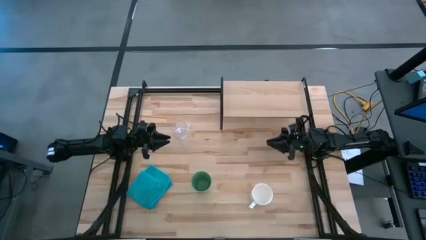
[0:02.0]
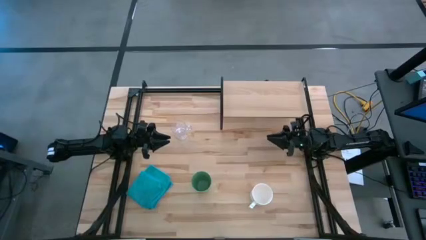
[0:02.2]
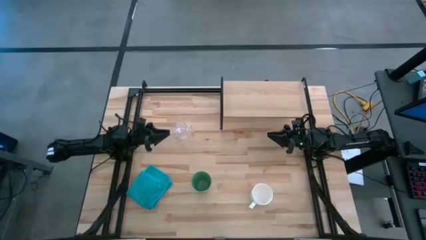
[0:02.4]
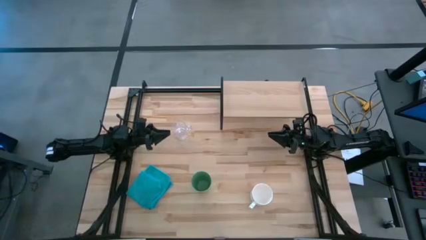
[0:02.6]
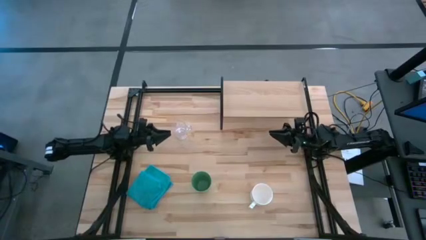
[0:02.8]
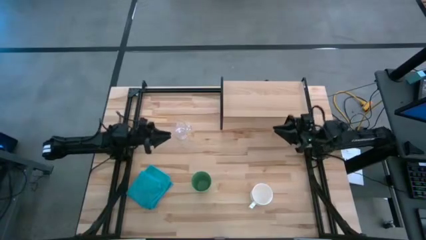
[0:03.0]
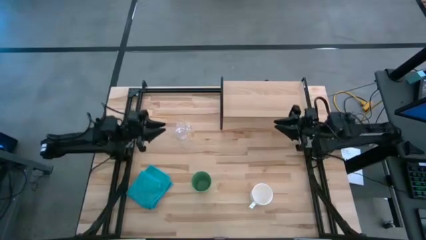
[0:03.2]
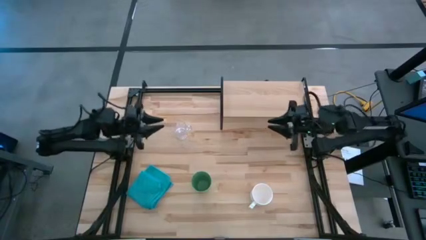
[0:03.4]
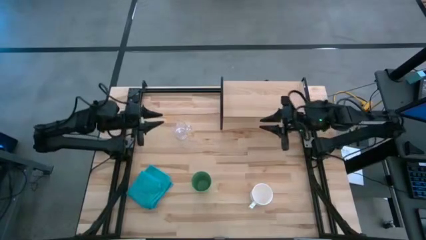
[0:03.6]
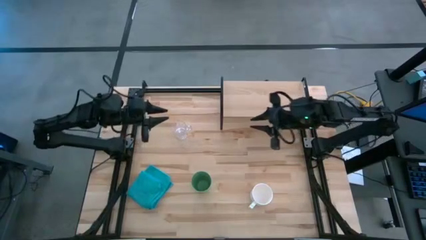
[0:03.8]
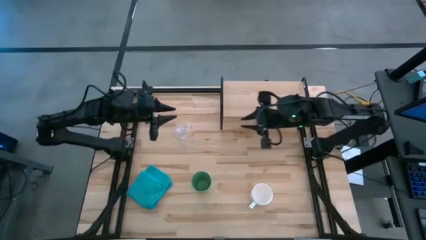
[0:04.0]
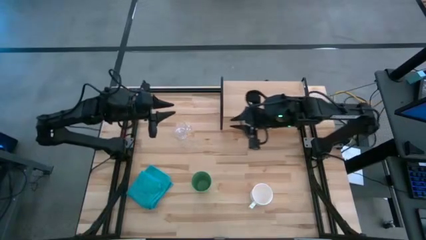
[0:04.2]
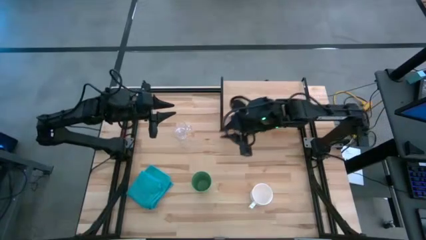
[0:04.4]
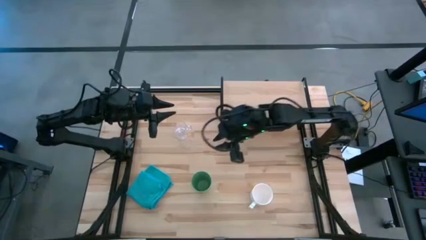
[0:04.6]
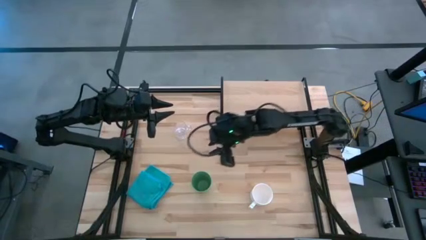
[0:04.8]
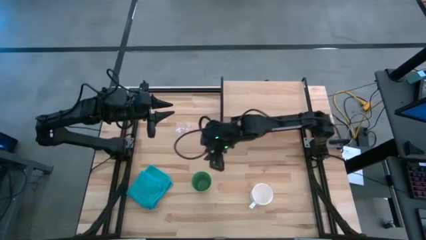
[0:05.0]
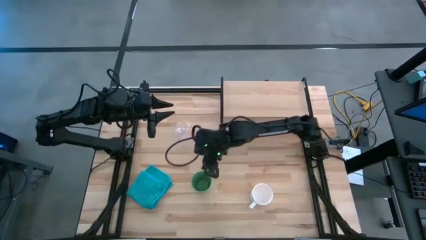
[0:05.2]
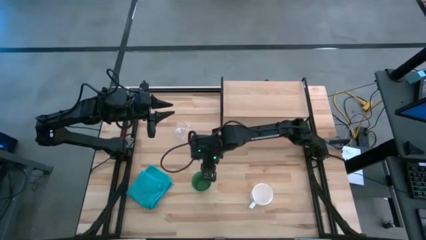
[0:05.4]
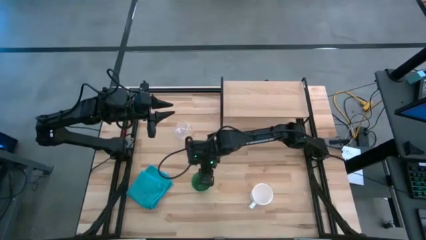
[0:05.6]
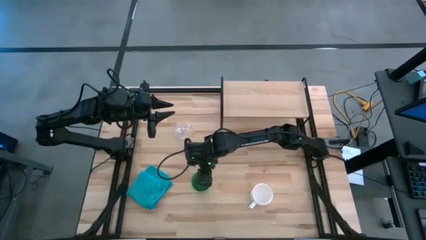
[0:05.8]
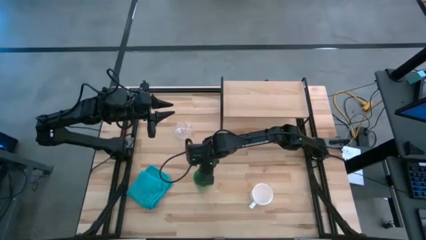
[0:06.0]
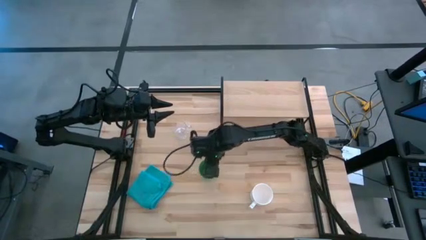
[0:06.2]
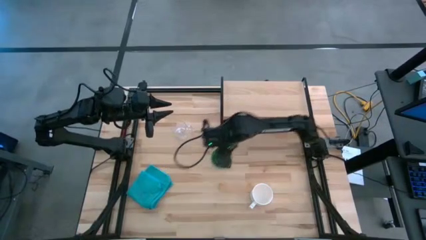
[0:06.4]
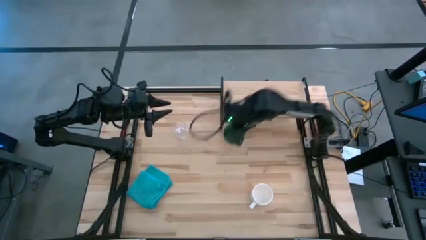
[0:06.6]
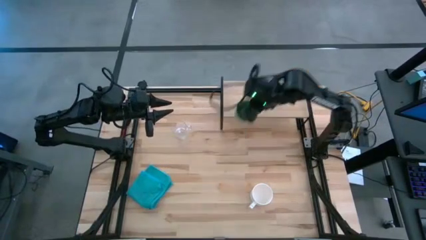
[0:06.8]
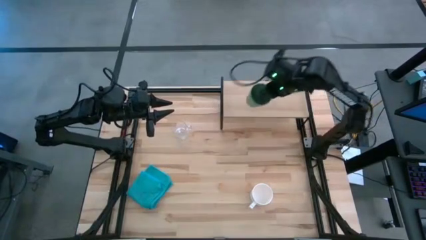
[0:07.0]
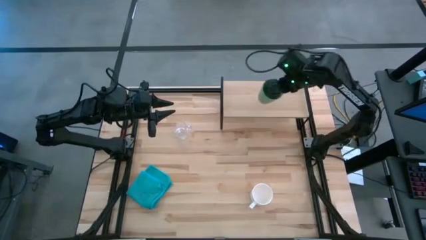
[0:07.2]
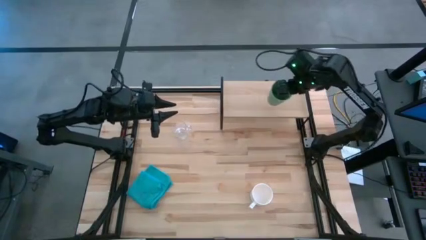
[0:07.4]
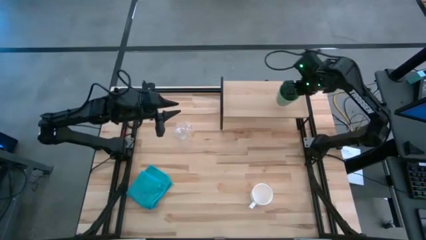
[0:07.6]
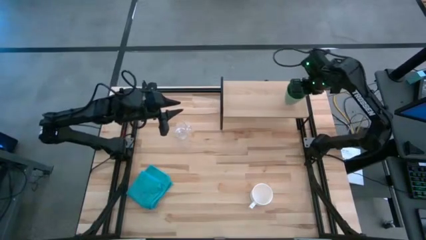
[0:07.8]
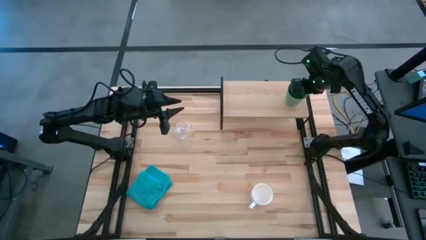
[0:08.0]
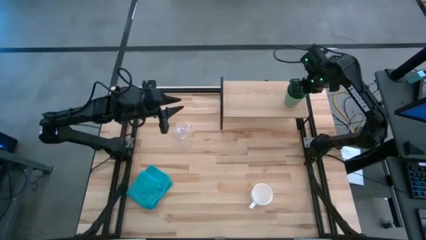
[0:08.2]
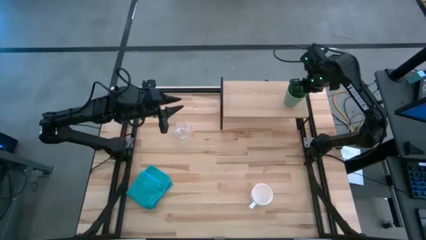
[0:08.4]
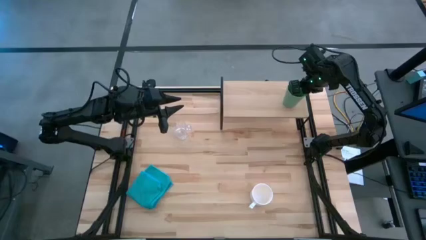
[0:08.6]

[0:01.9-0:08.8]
Task: Stack small to large cups/mugs on shelf
Put the green cup on the shelf

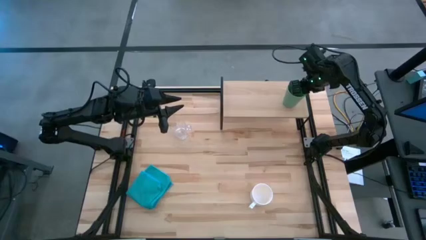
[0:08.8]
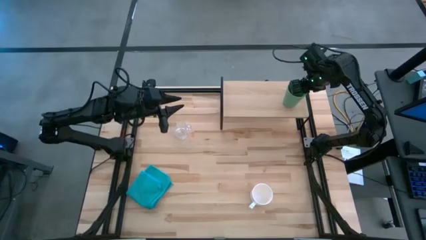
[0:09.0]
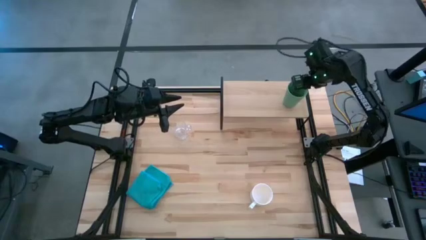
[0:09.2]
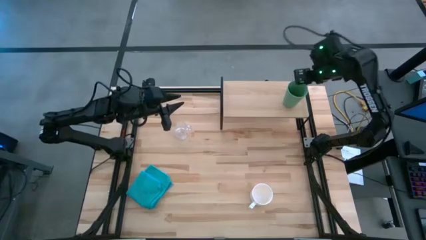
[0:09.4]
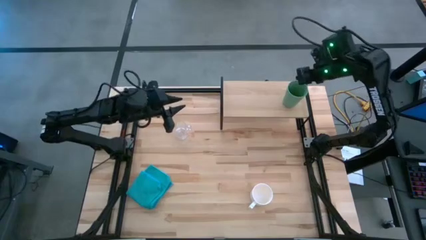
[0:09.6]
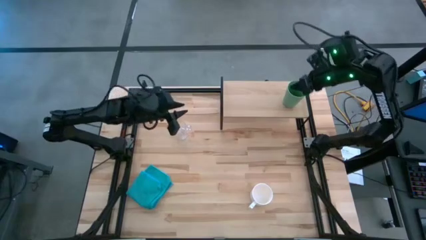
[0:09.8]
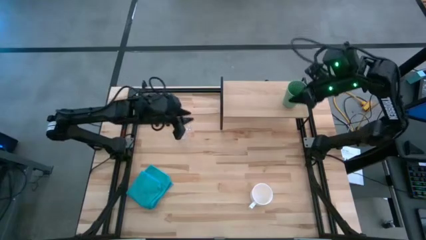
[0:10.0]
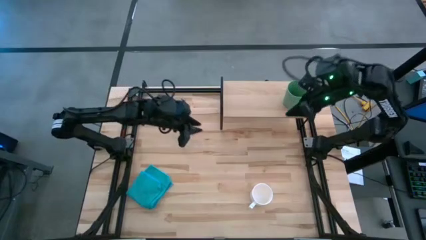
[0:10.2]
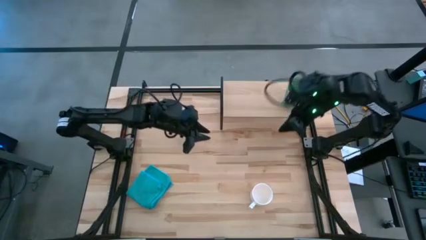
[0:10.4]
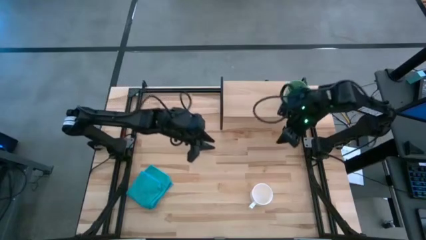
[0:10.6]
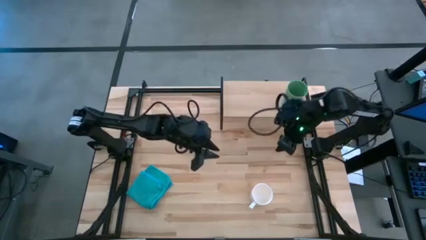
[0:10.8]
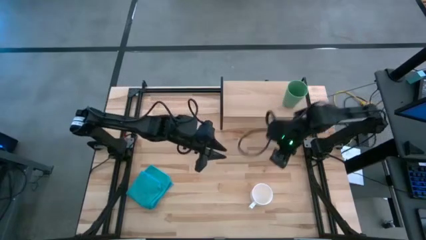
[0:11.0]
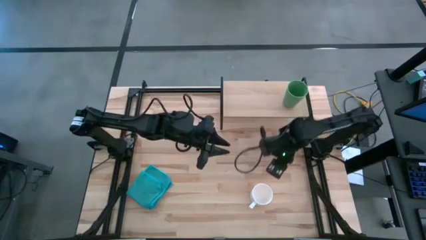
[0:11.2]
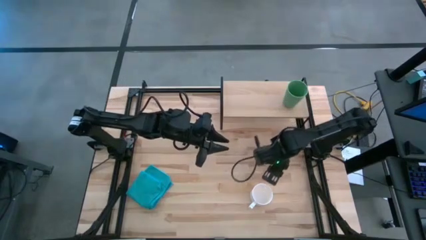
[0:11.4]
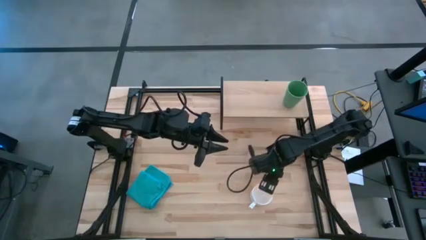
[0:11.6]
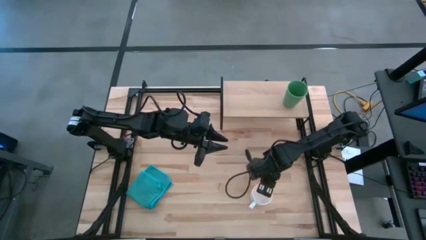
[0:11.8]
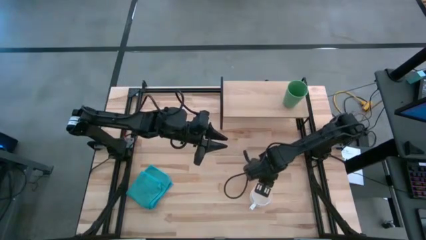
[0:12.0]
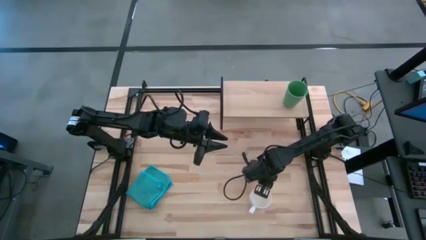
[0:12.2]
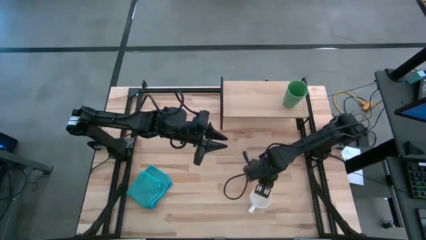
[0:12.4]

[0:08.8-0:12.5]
Put the white mug on the shelf

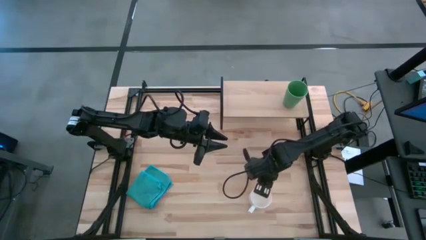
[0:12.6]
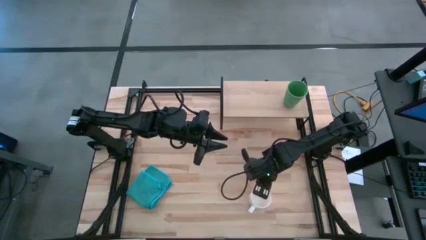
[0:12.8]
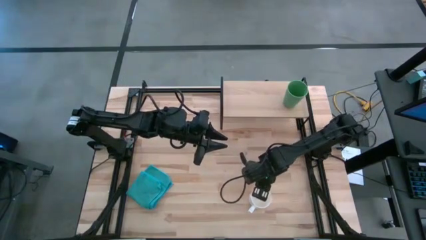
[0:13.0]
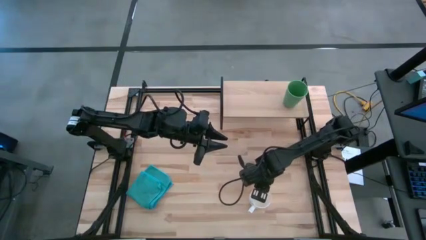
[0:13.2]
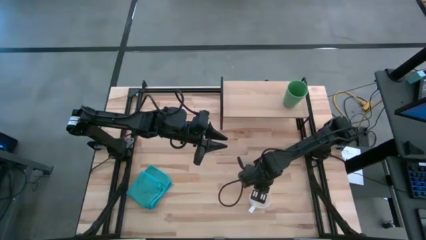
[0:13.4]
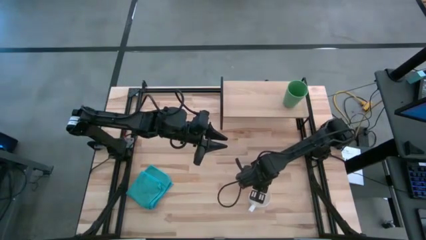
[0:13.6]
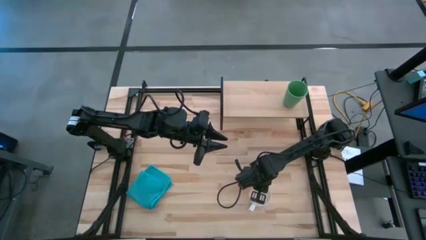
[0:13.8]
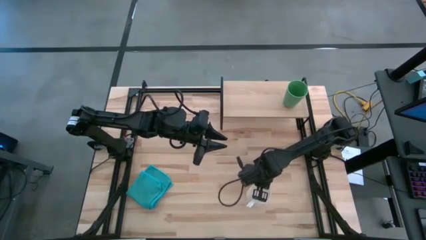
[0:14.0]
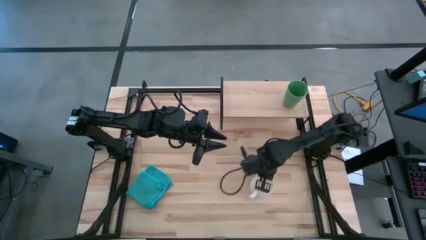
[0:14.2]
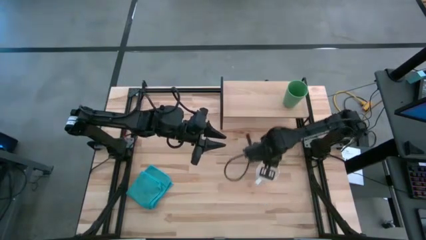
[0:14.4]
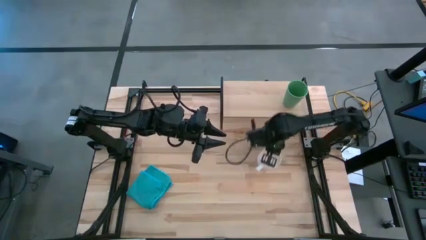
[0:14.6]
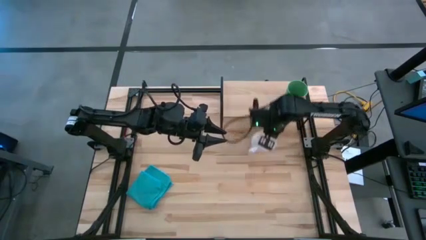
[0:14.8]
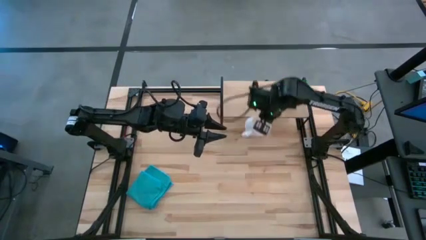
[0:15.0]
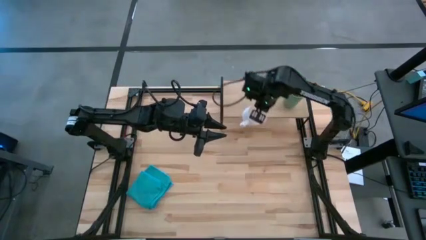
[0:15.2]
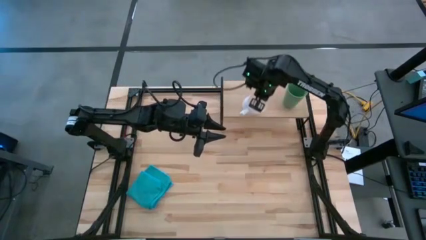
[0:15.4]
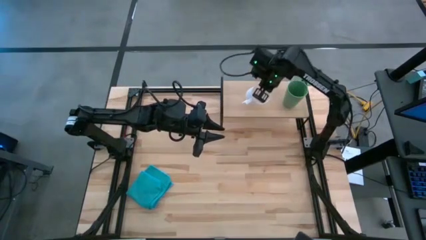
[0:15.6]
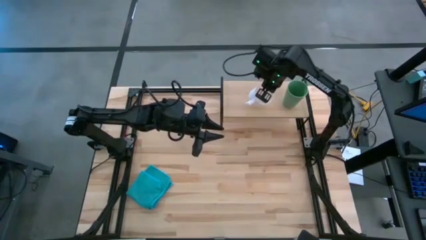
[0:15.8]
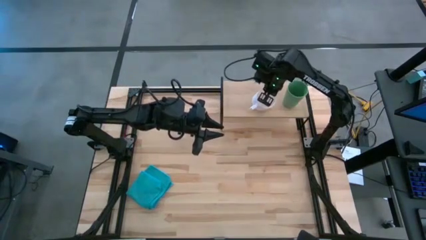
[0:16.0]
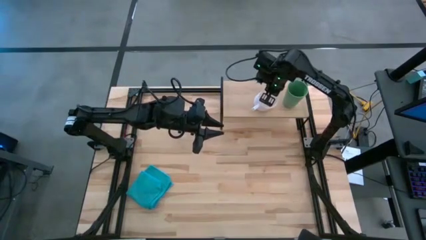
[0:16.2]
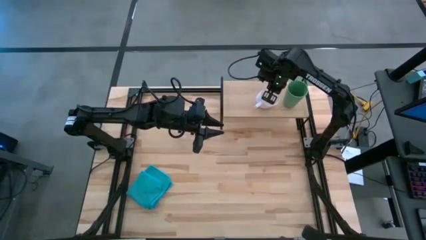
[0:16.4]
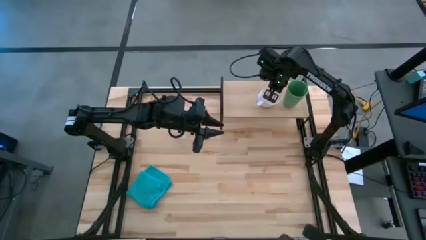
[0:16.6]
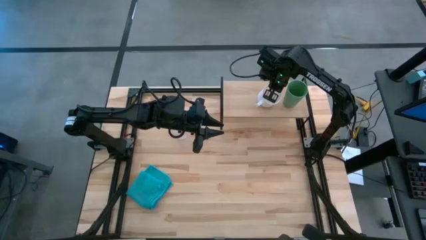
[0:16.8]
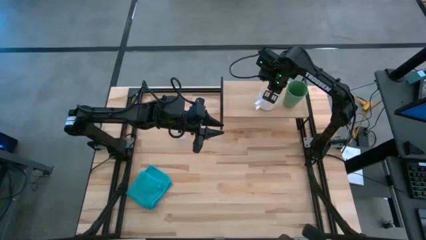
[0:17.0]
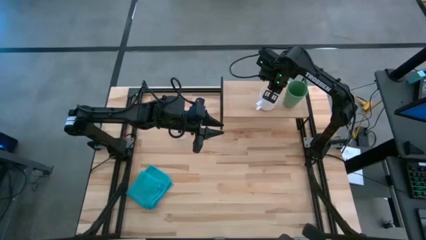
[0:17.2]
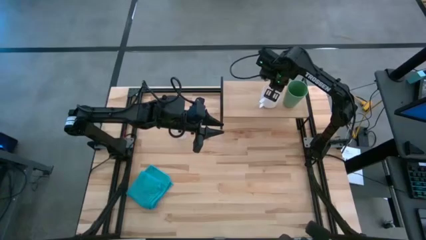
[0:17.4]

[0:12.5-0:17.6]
Put the white mug on the shelf
